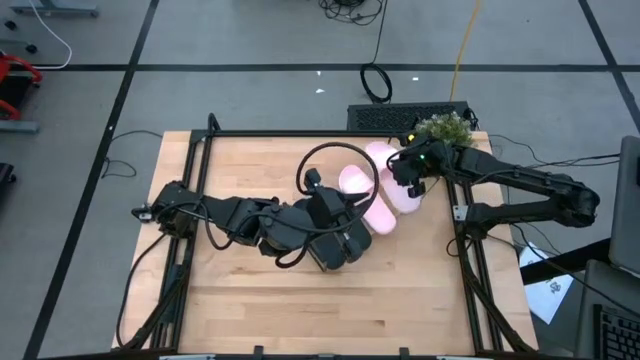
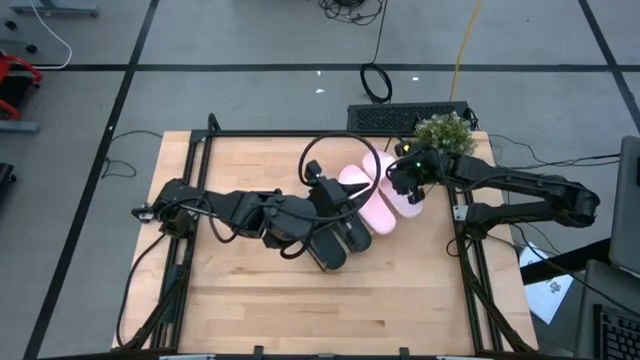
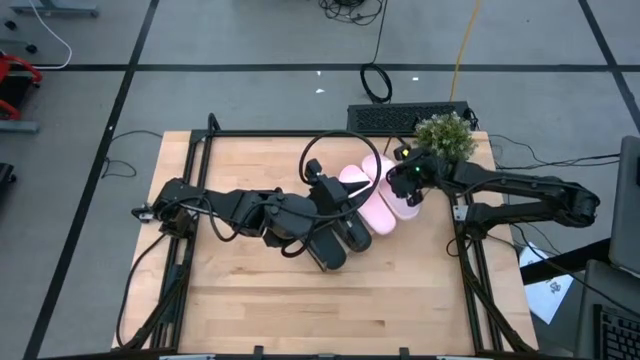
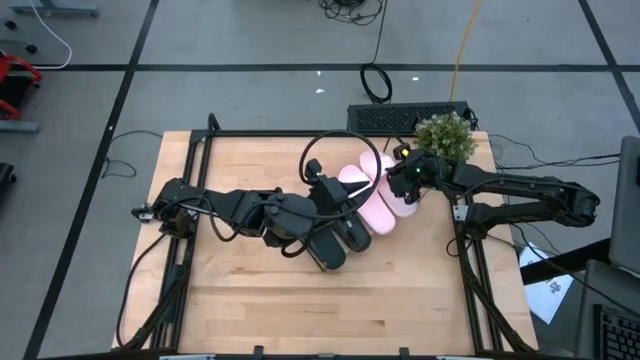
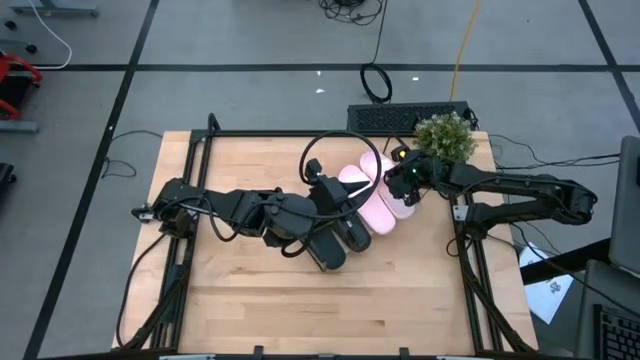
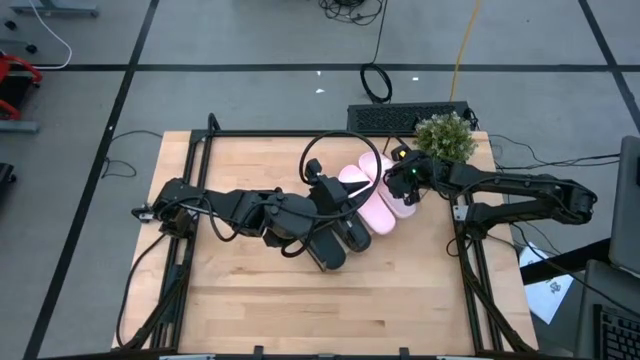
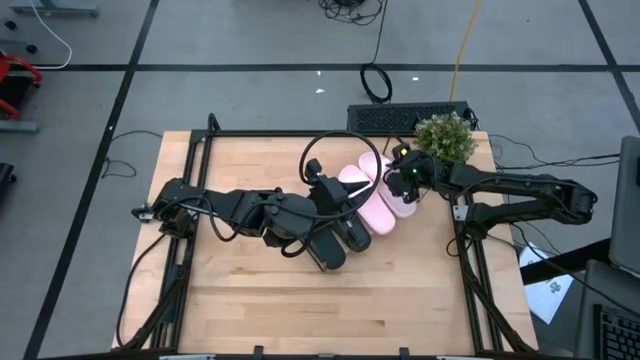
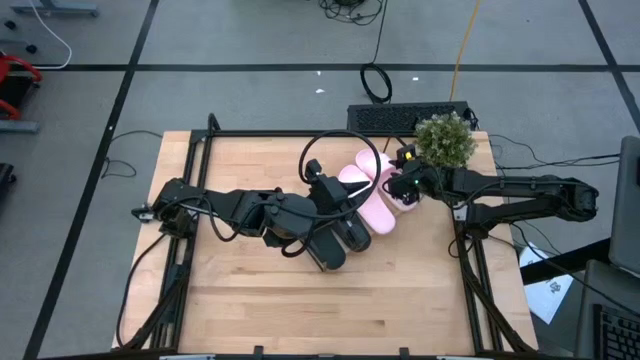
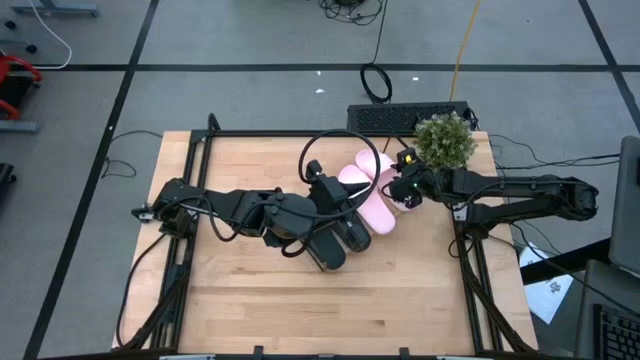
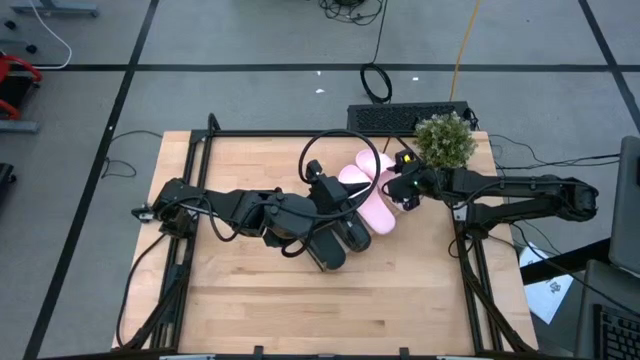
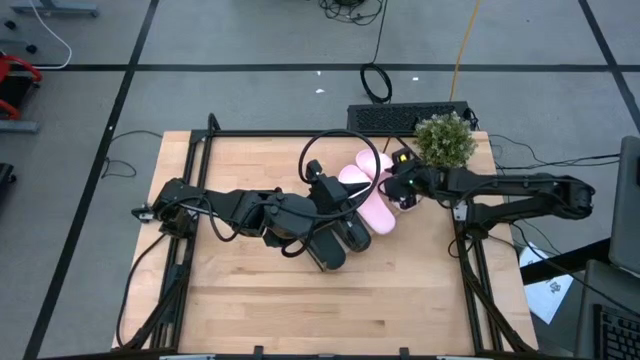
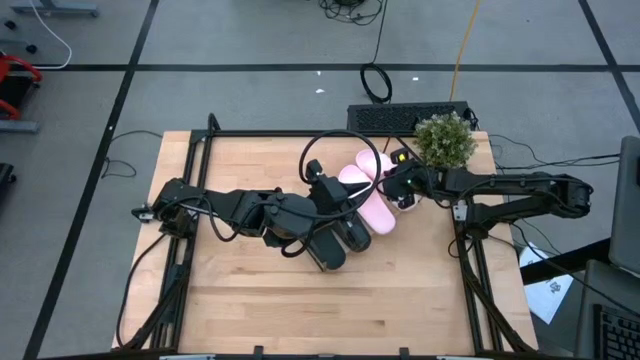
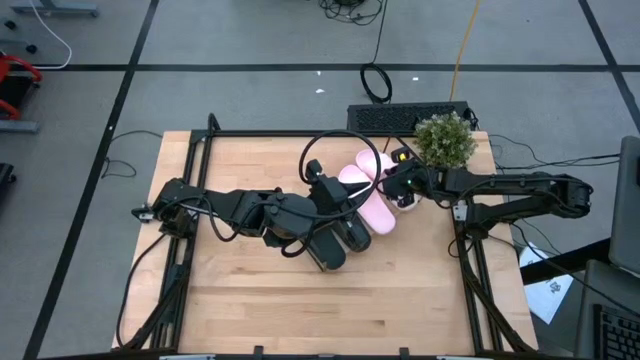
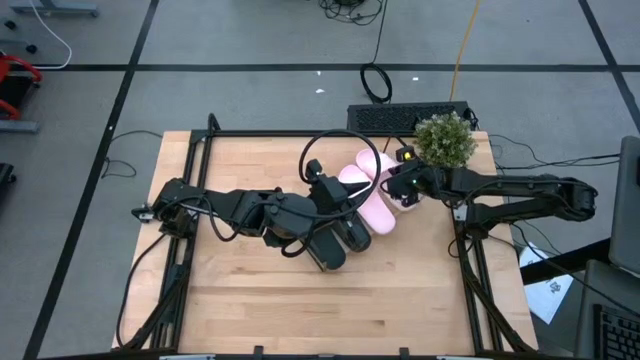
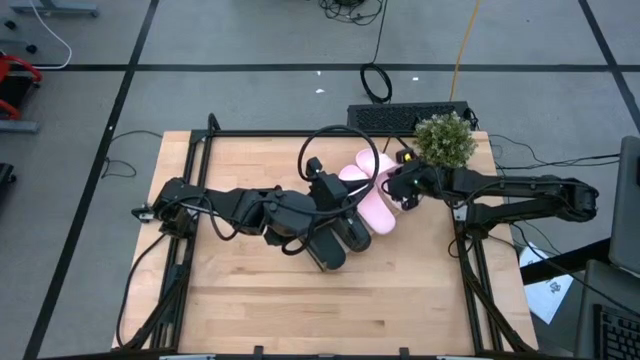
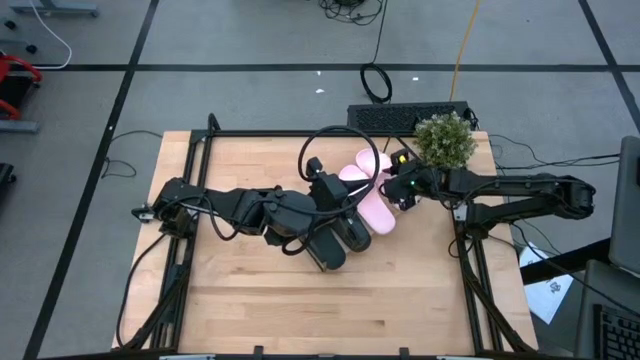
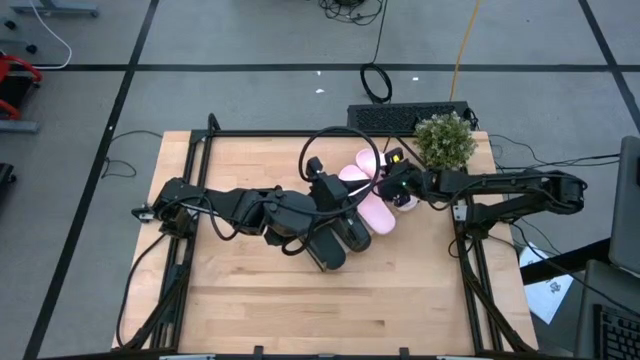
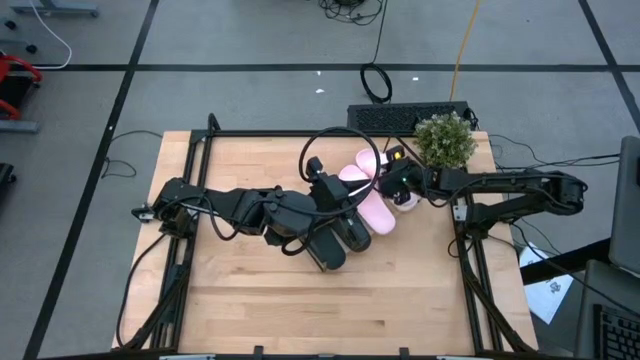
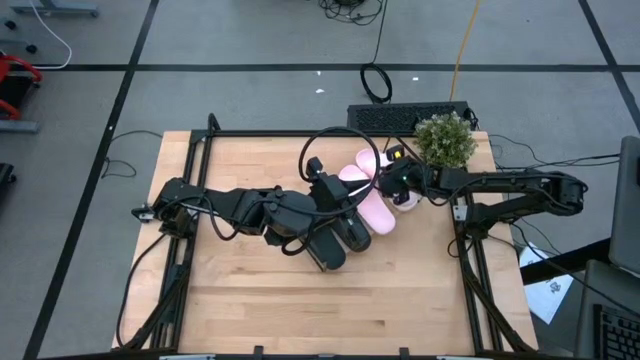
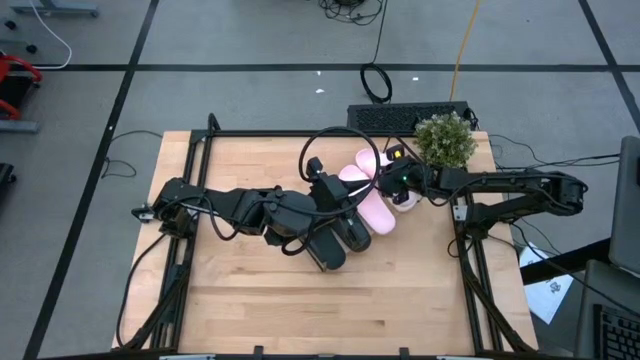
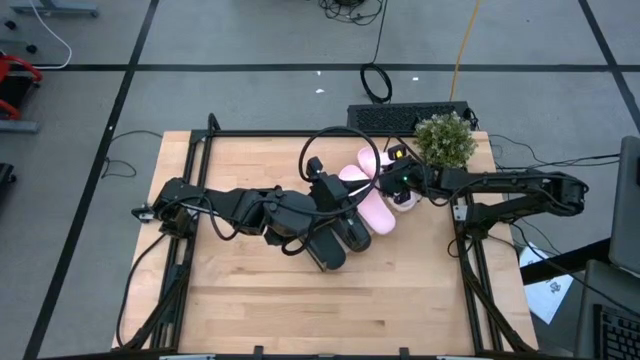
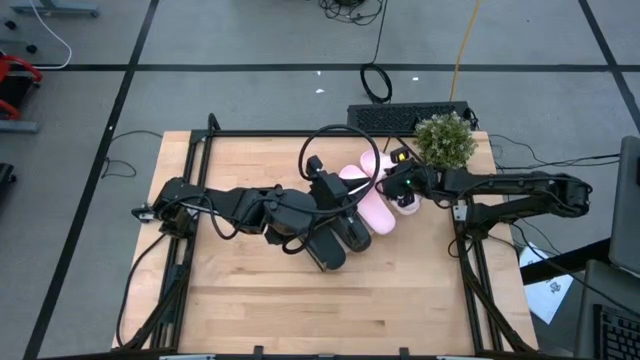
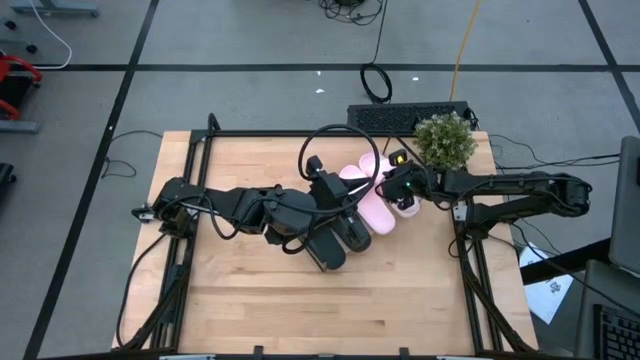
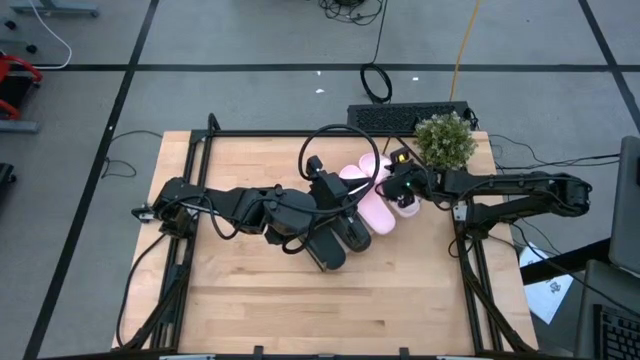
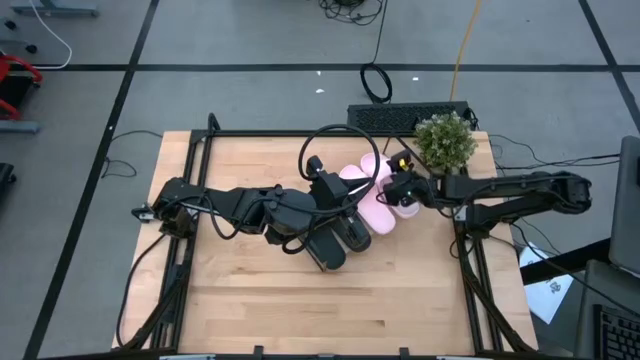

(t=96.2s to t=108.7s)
Task: Pick and place slides into the shelf
Put the pink slipper on the shelf

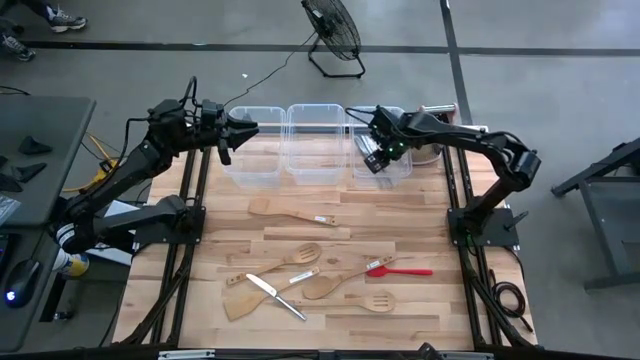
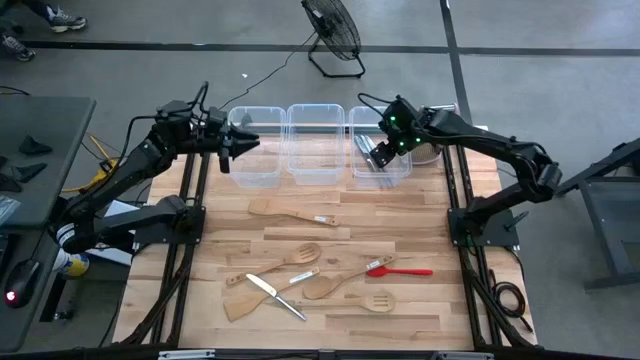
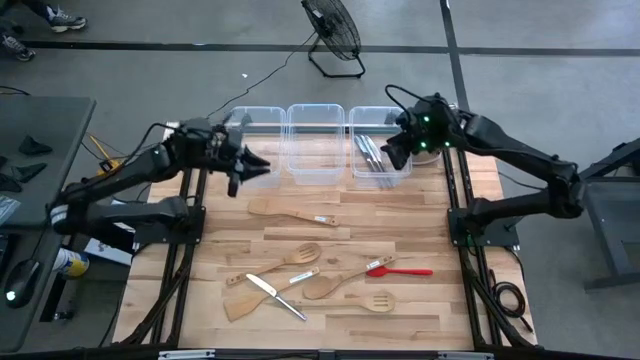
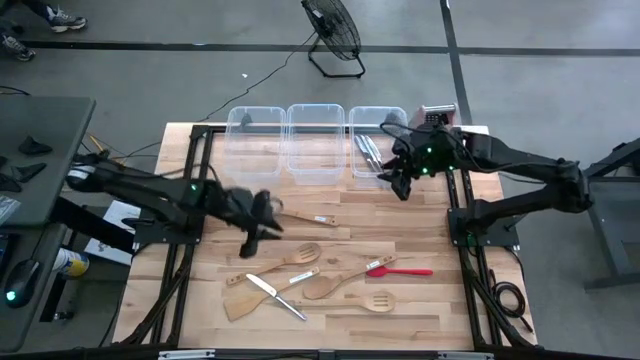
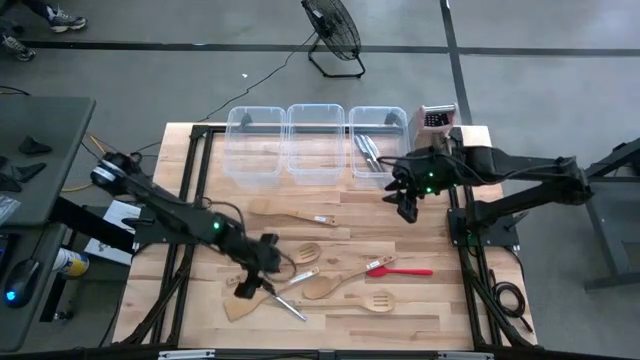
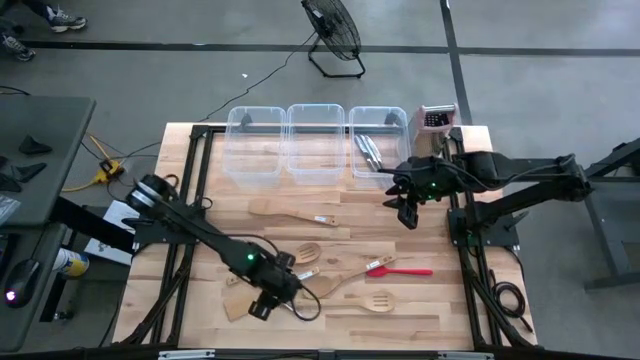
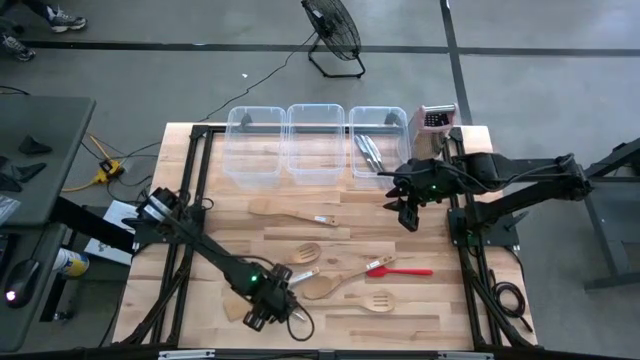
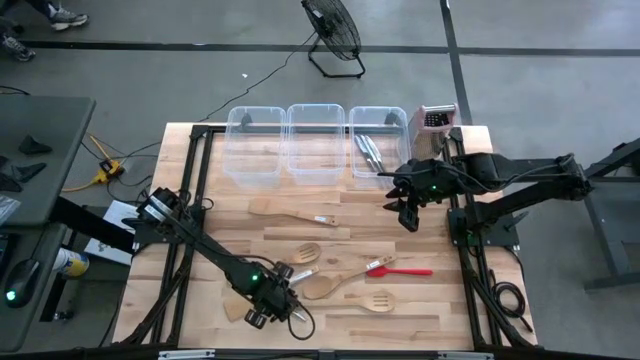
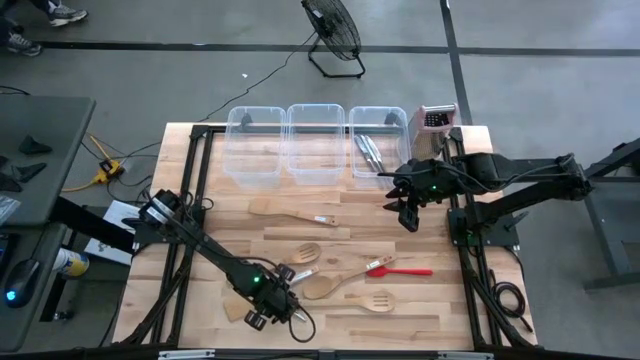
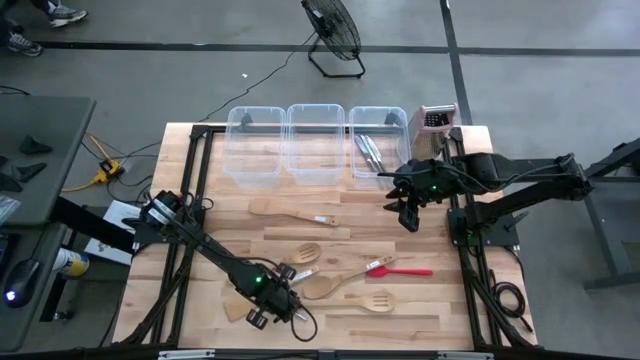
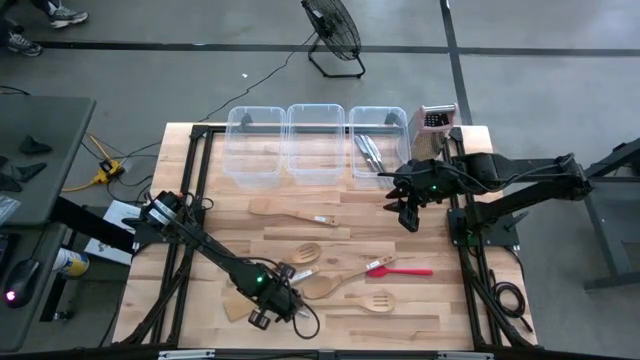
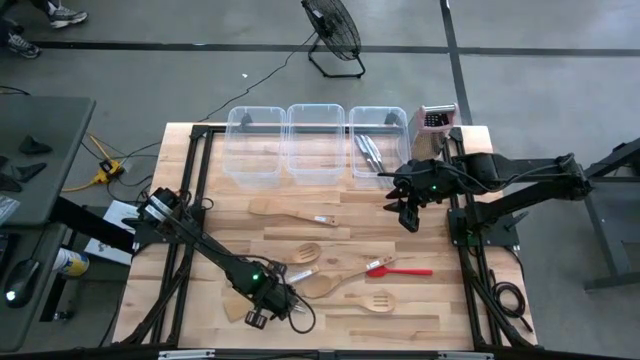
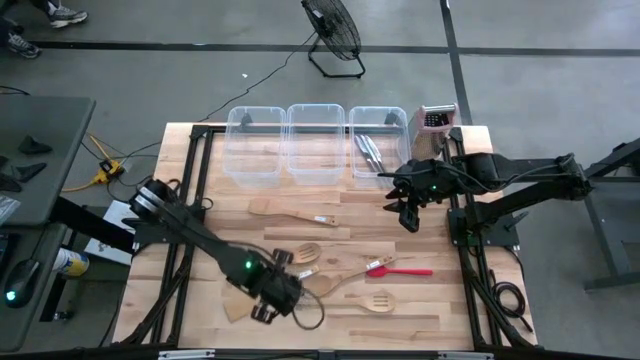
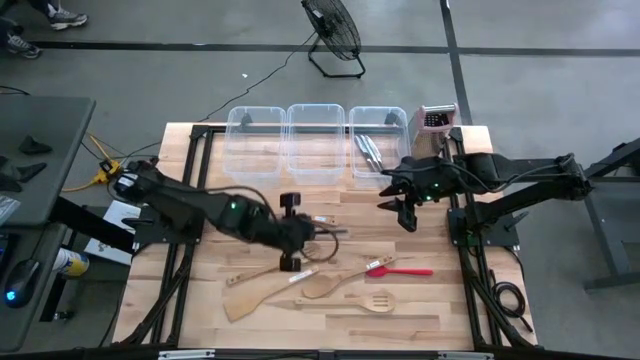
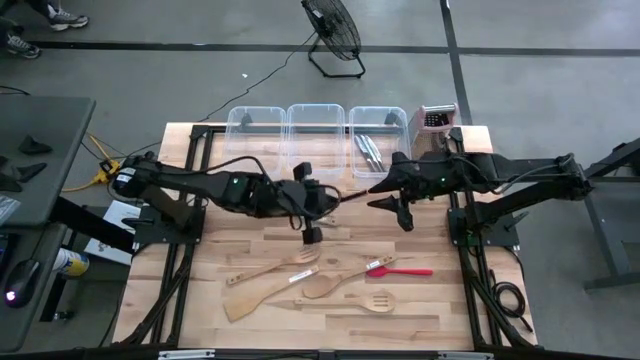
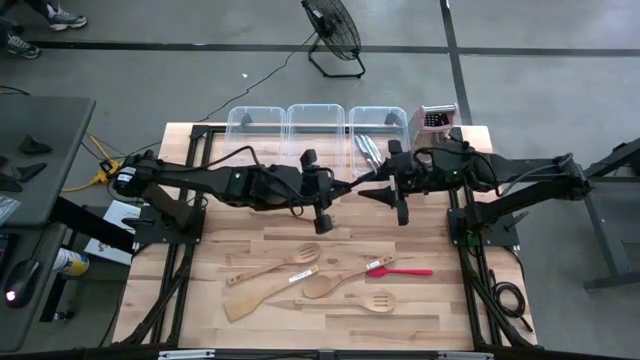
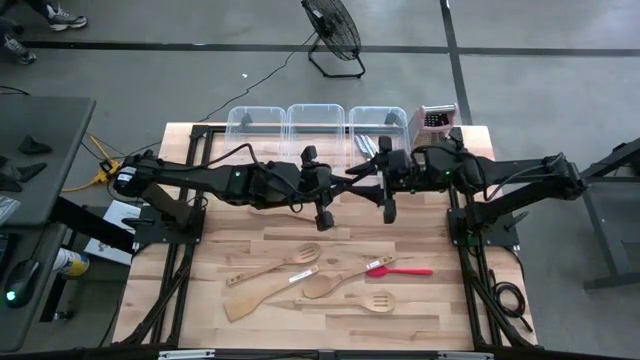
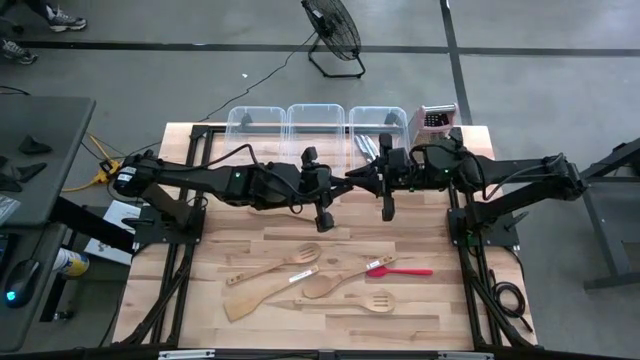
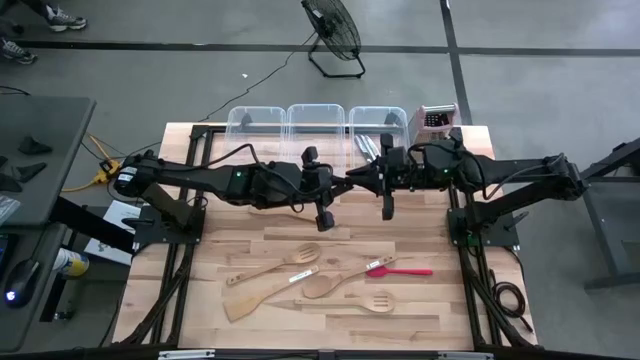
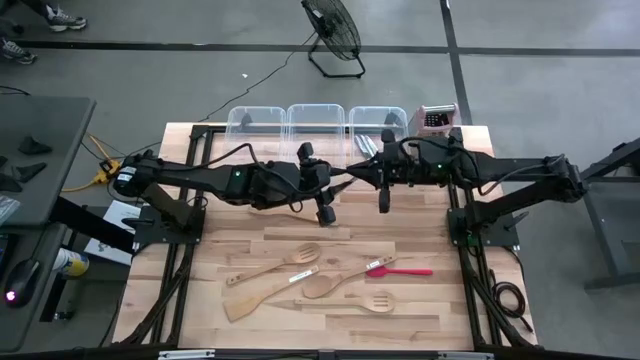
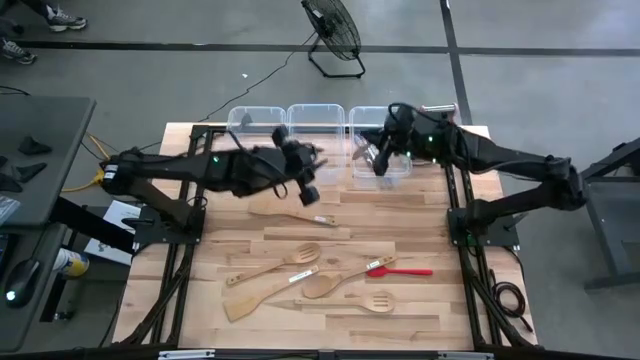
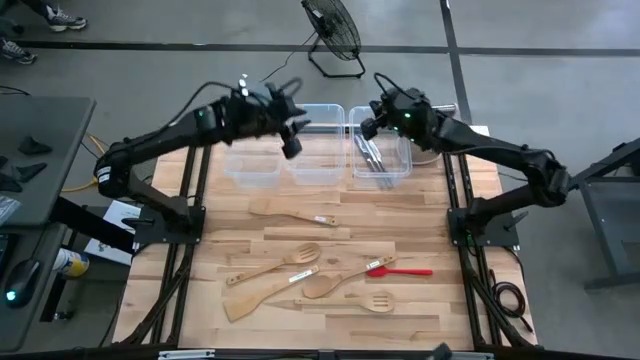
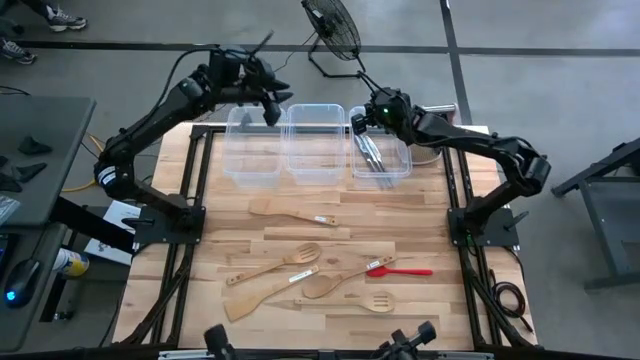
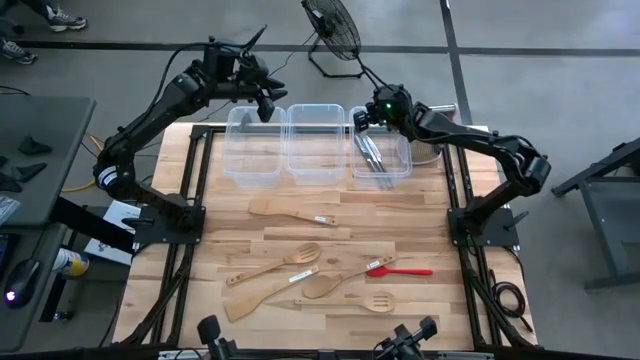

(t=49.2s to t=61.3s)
Task: Pick & Place Kitchen Items
Put the table knife into the right transparent bin
